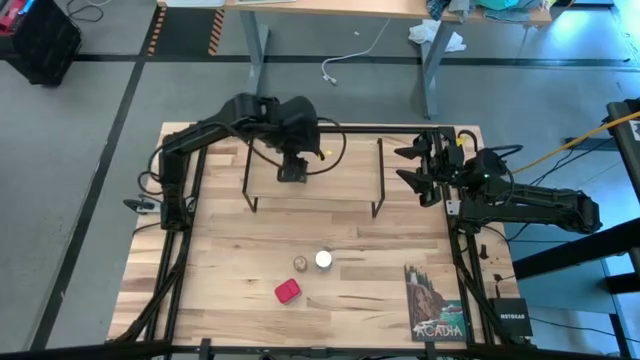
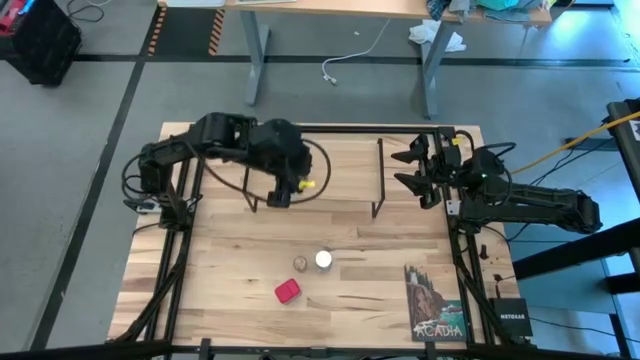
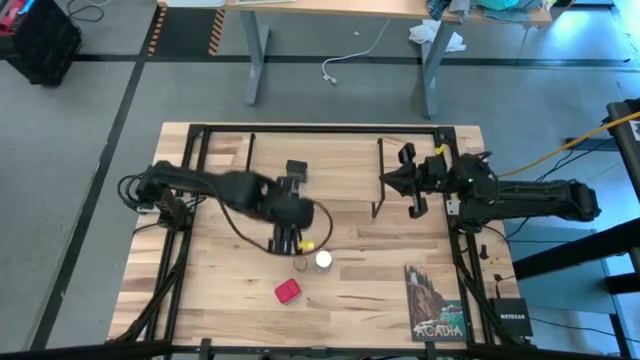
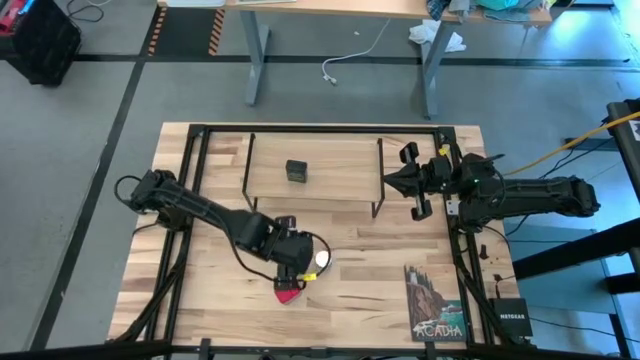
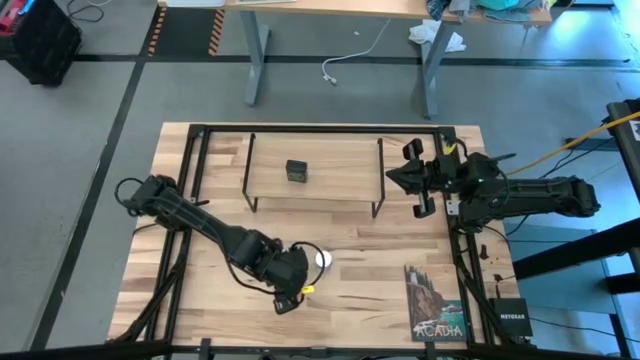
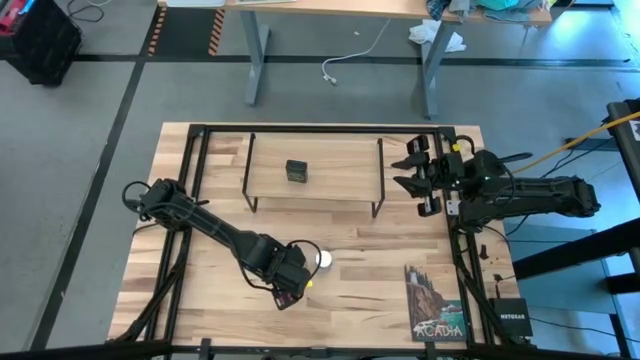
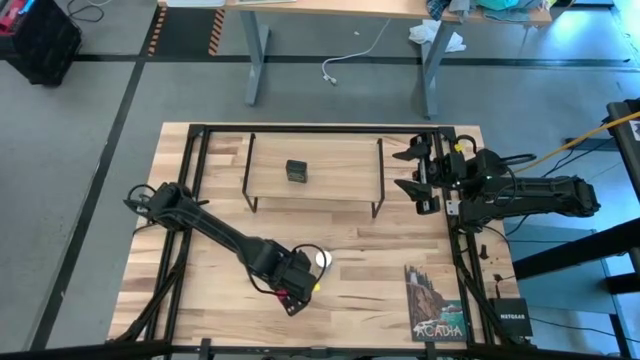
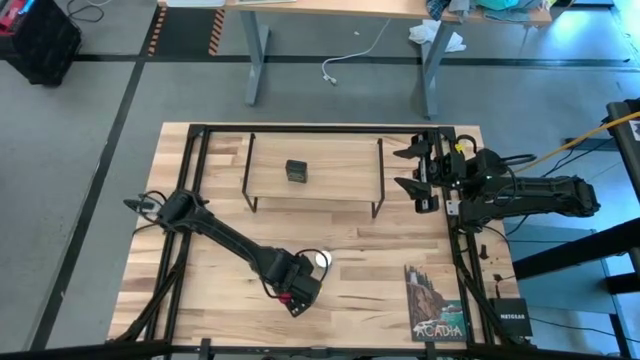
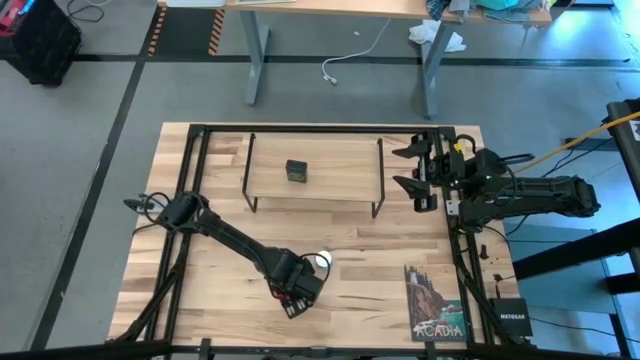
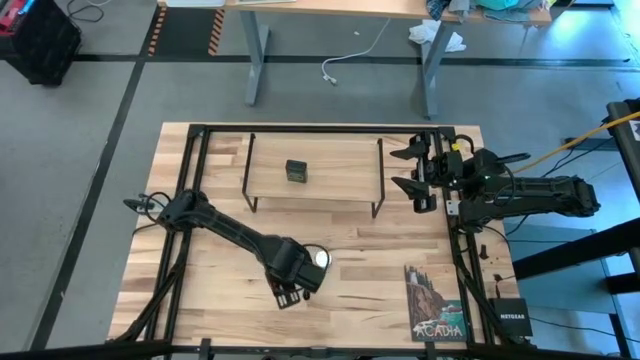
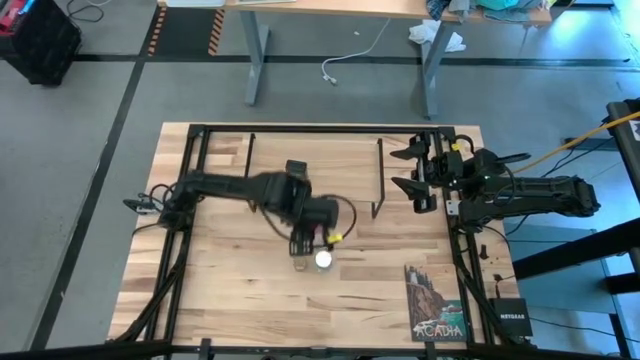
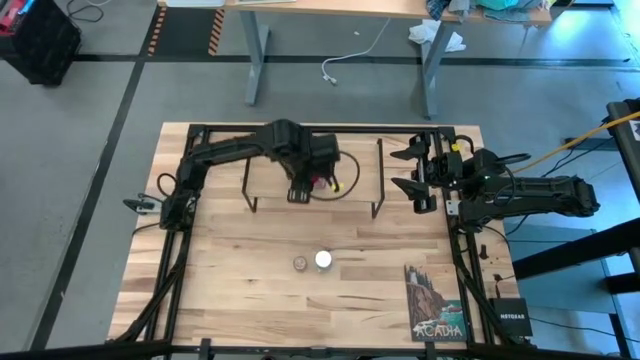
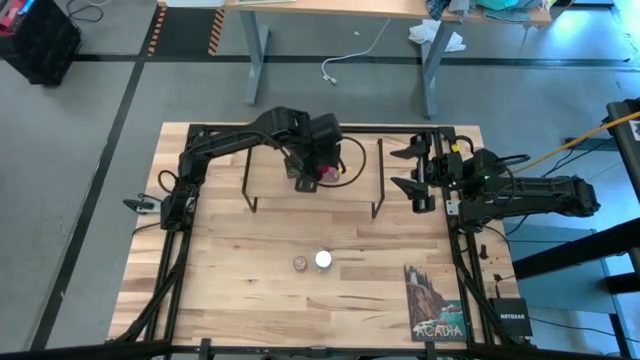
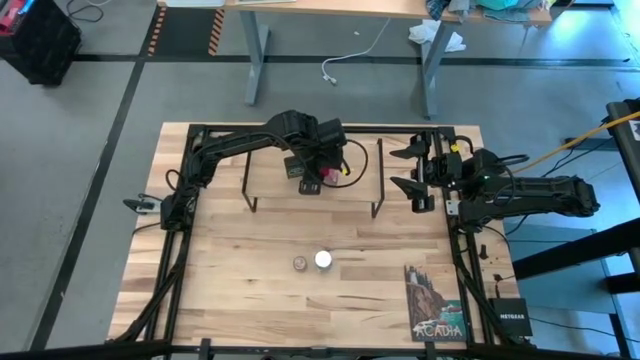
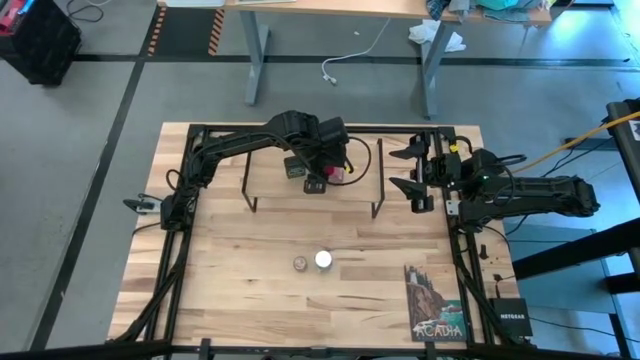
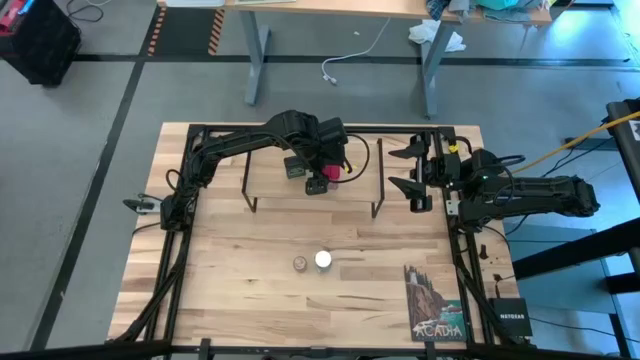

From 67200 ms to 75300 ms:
Task: Shelf spices
Put the red seasoning can on the shelf

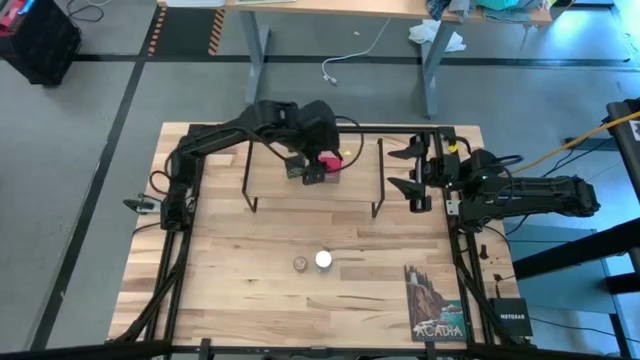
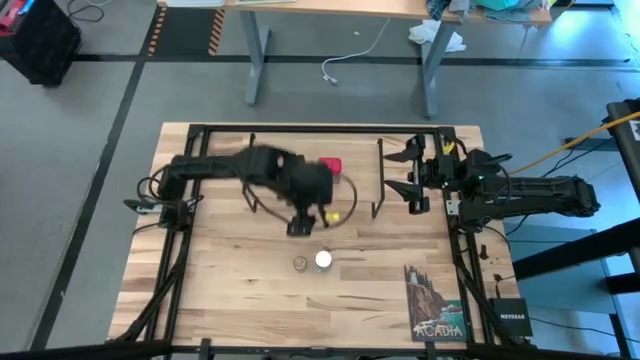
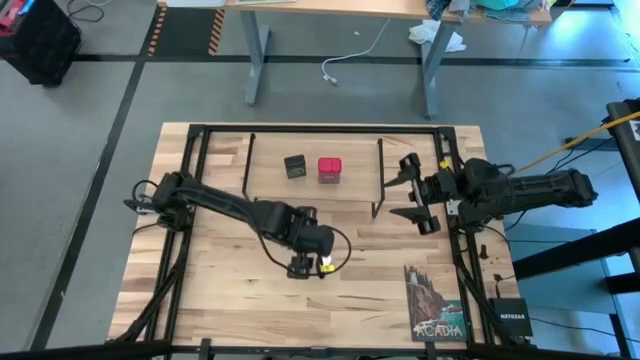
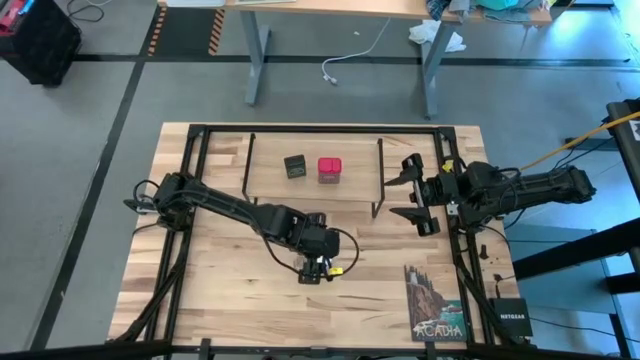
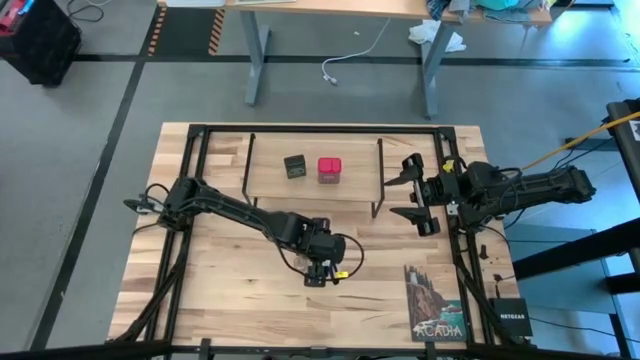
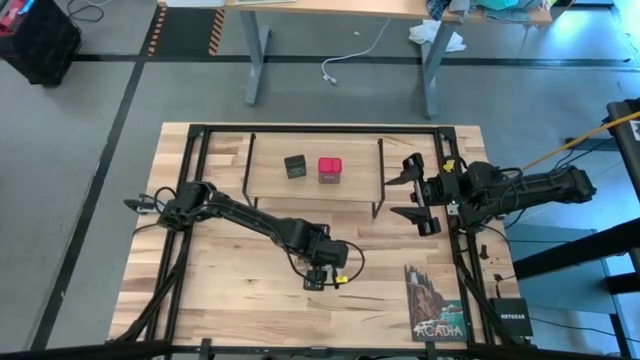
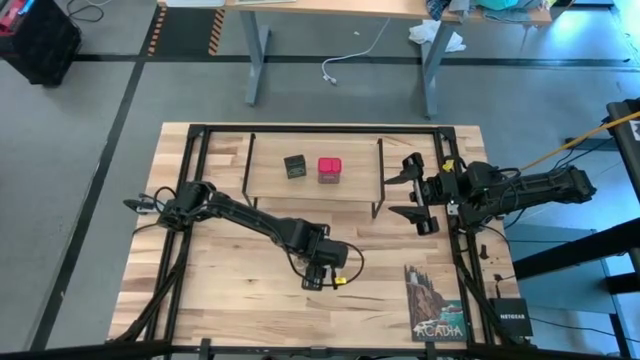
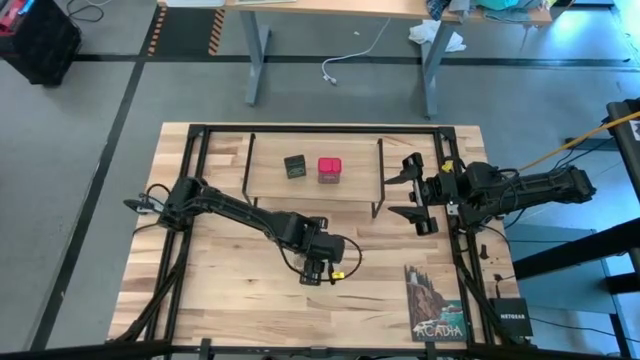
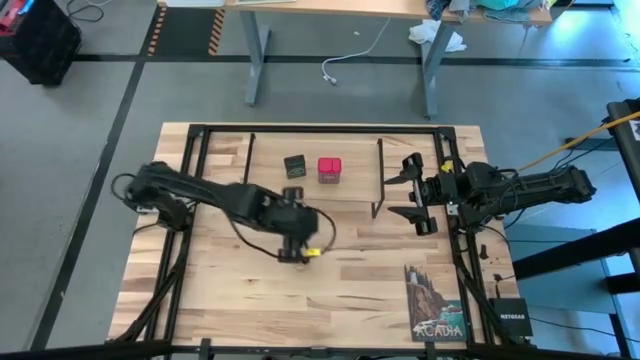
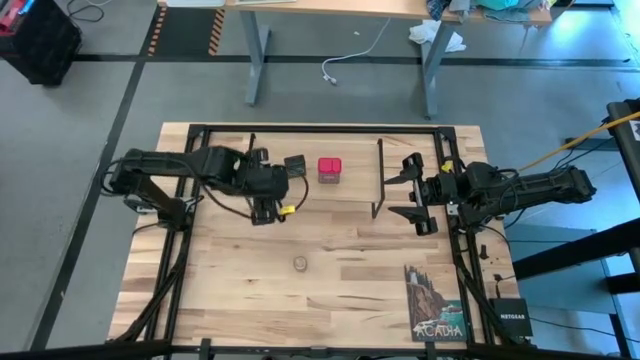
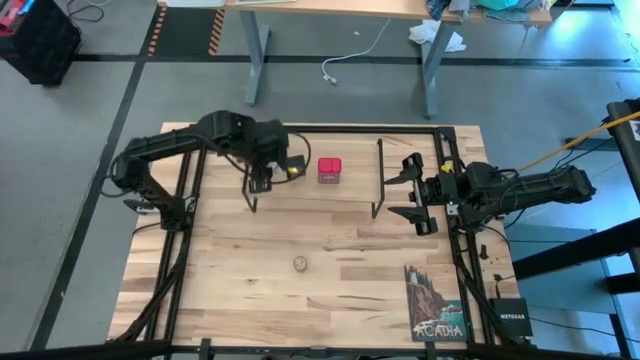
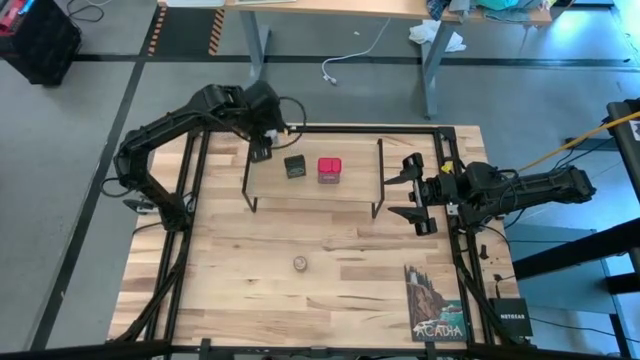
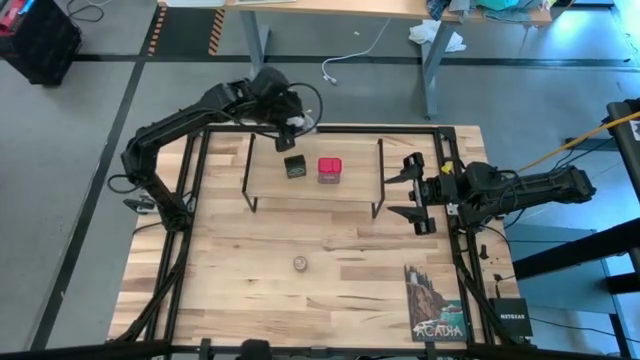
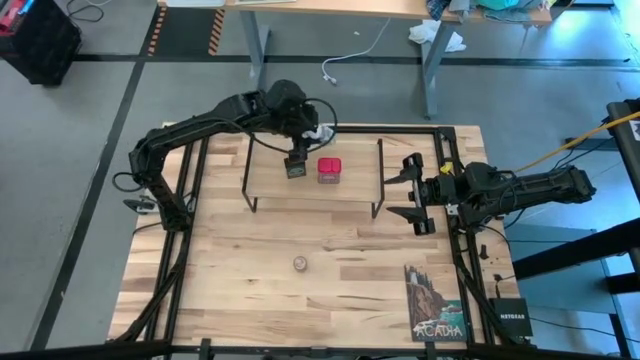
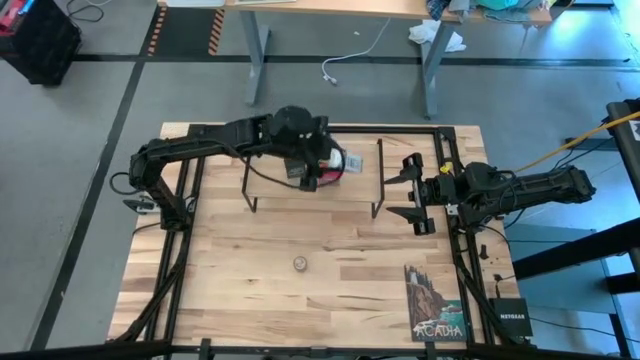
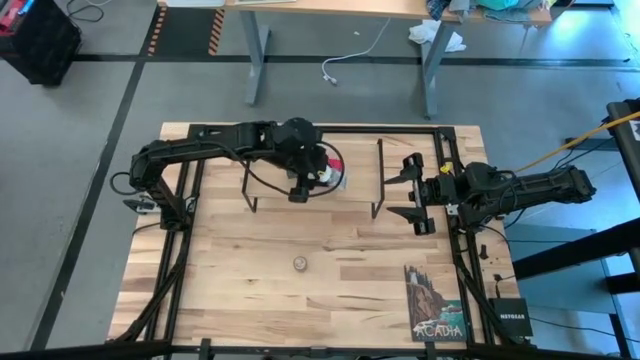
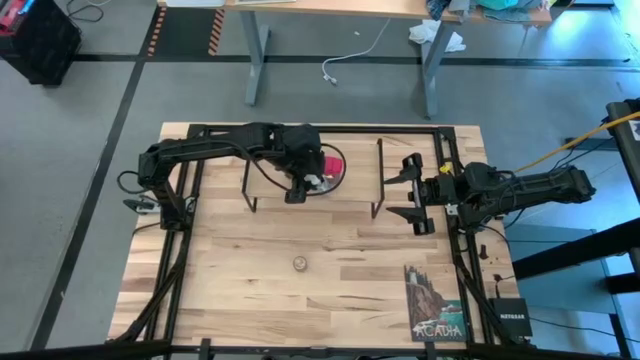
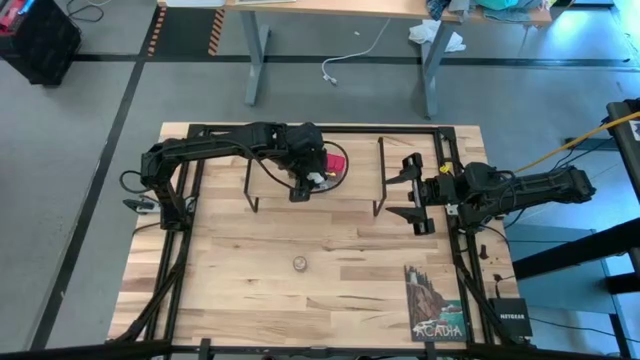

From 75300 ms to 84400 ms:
Put the white seasoning bottle on the shelf

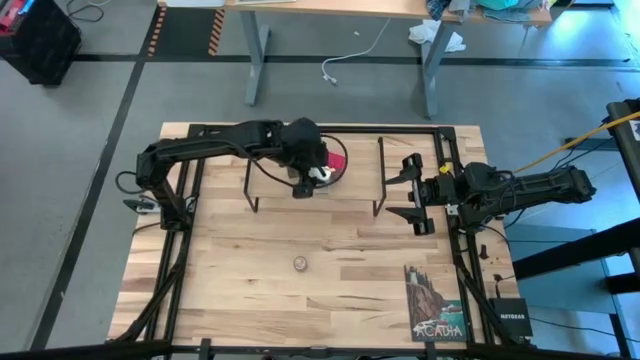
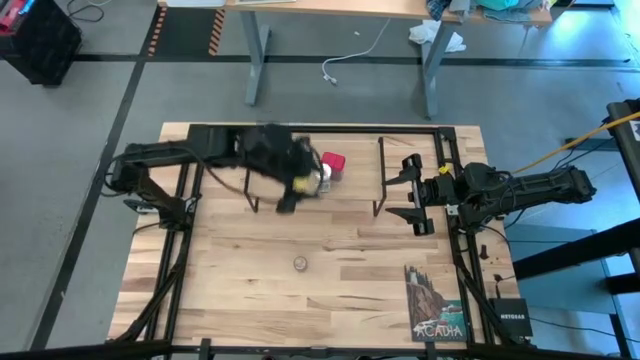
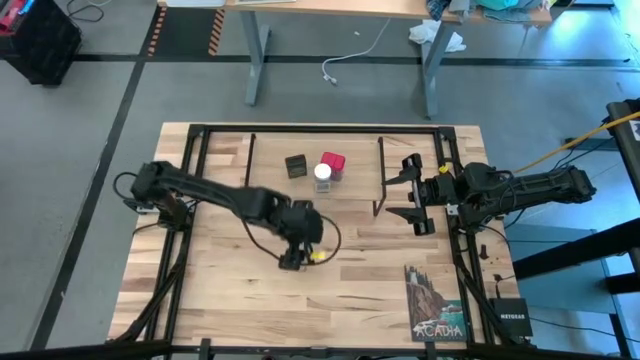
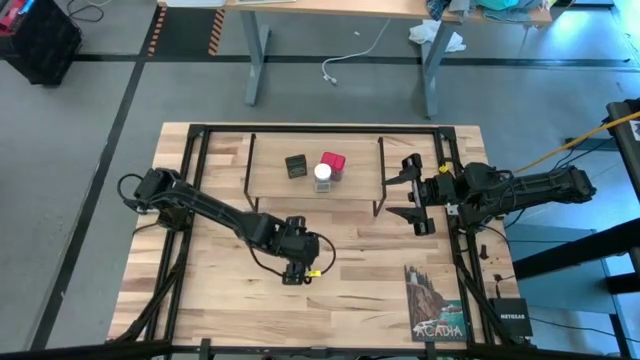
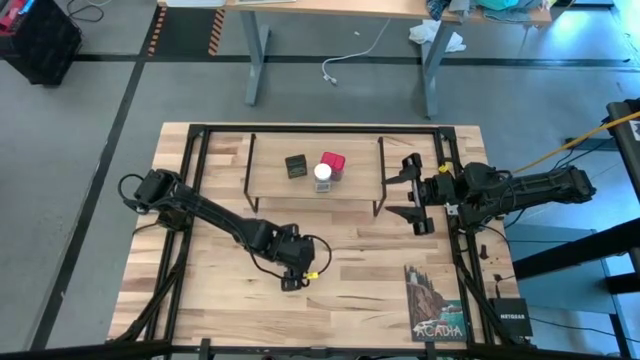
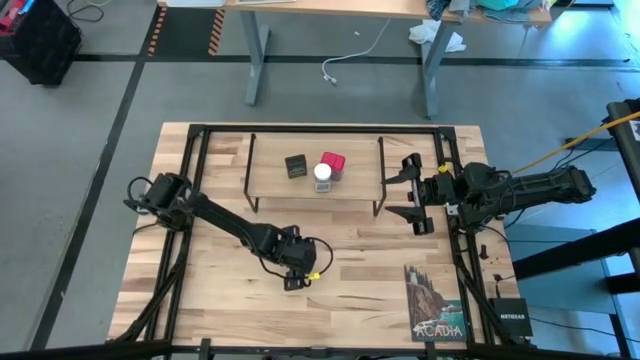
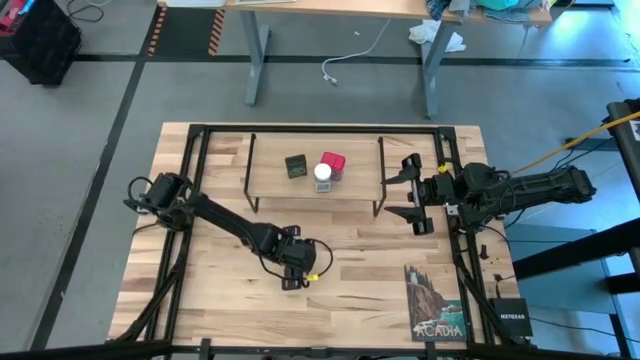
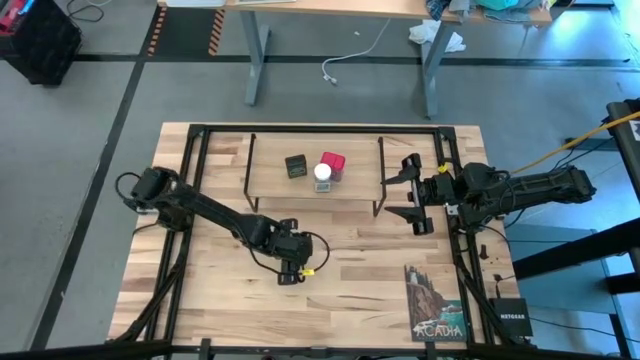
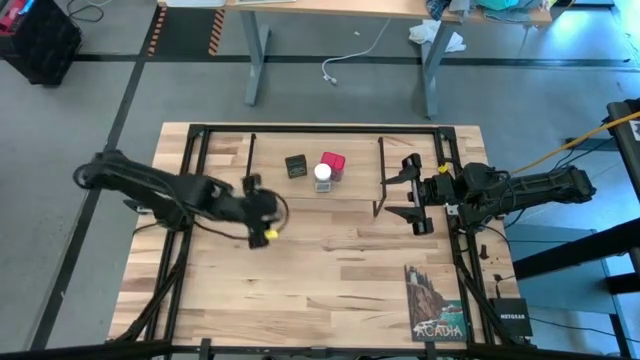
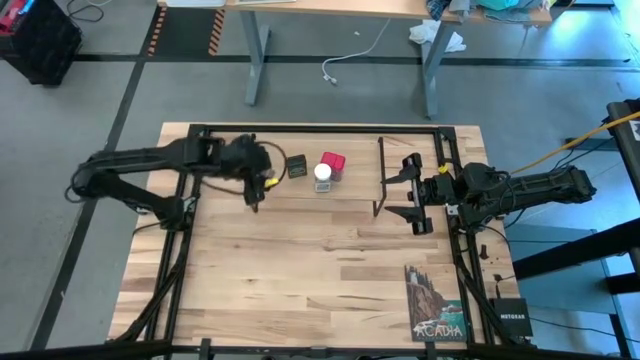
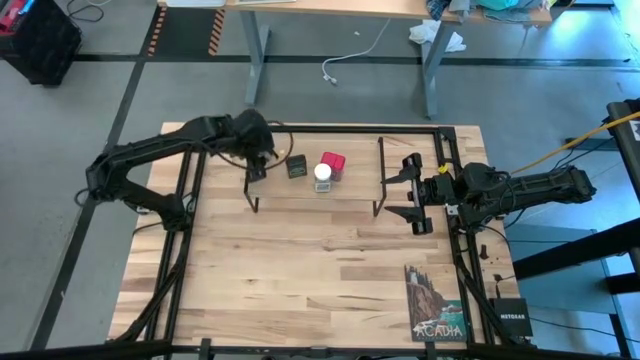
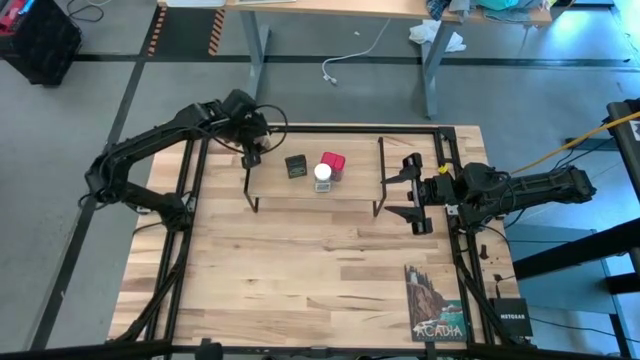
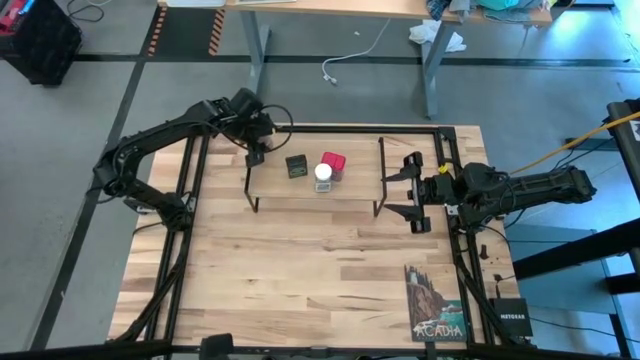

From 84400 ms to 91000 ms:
Put the transparent seasoning bottle on the shelf
